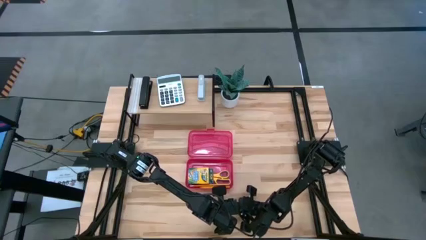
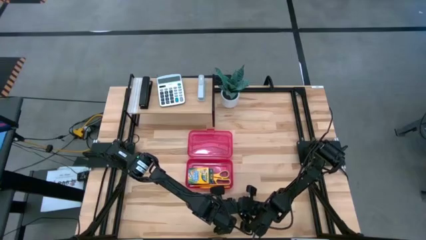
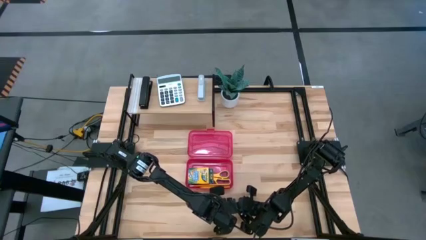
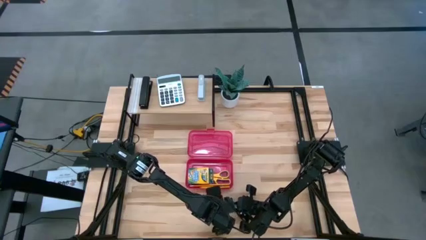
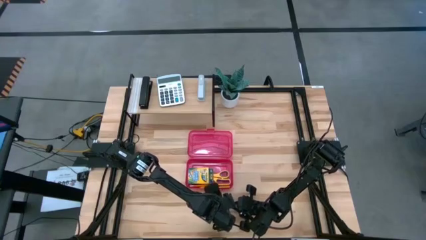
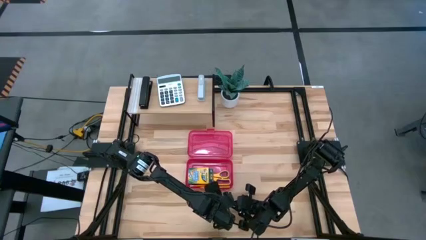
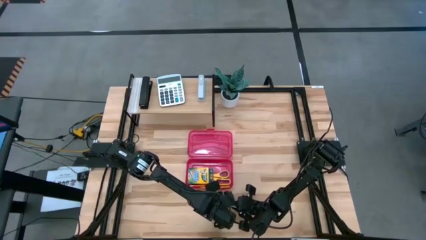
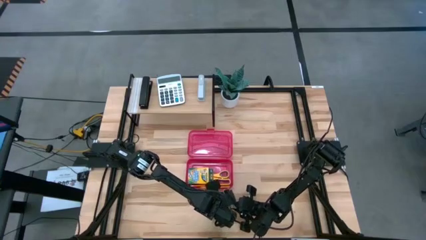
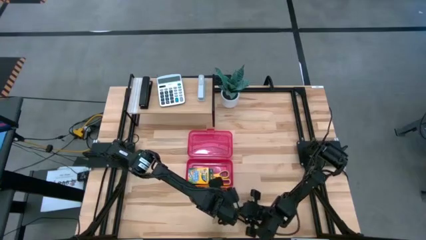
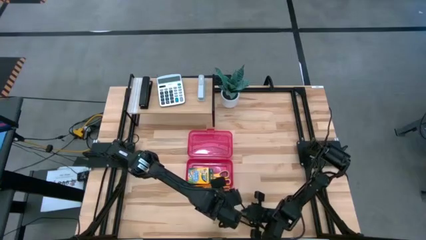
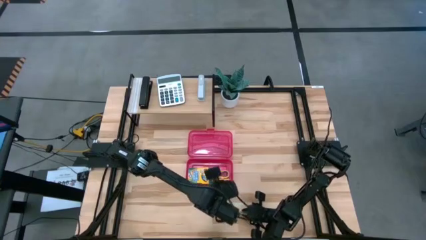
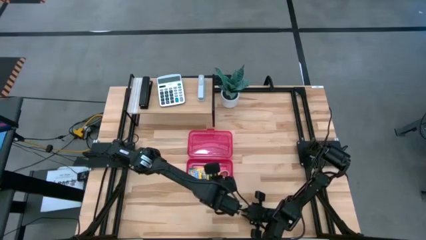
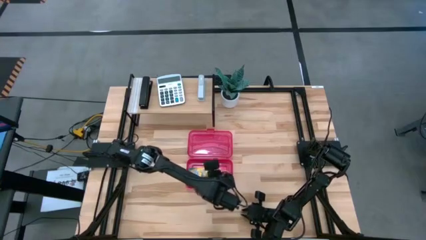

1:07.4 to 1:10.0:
Task: Pack school essentials
Put the purple eraser into the school red supply box

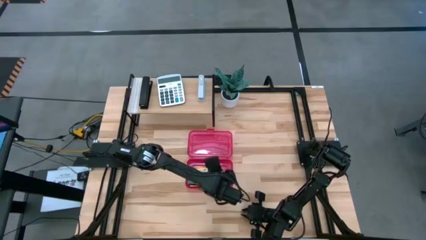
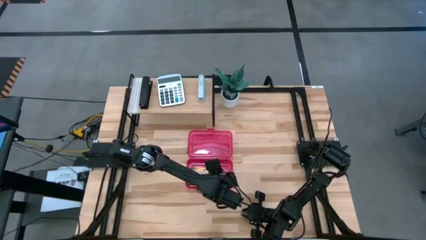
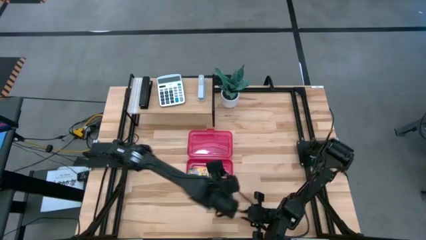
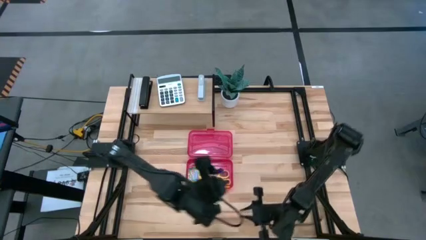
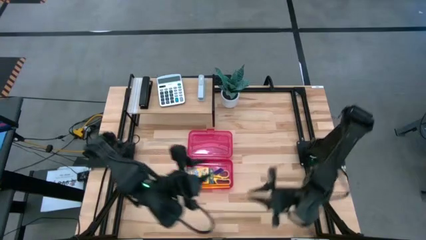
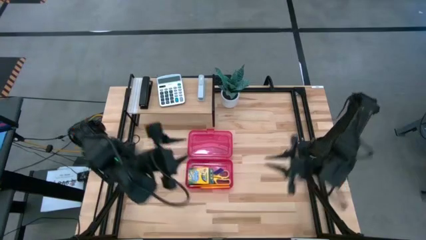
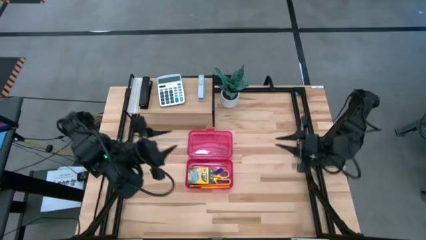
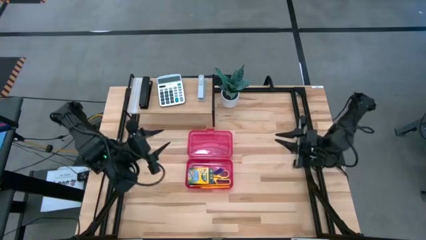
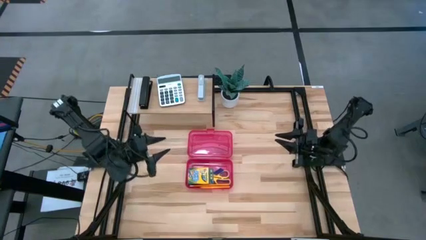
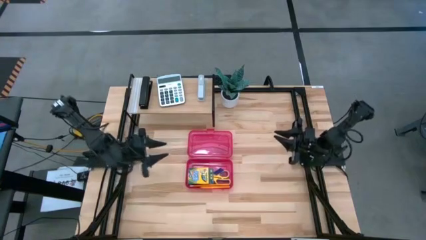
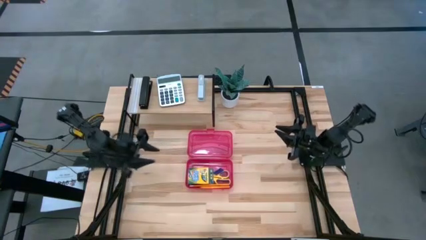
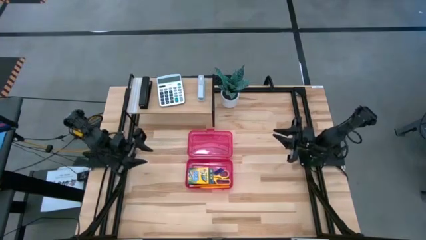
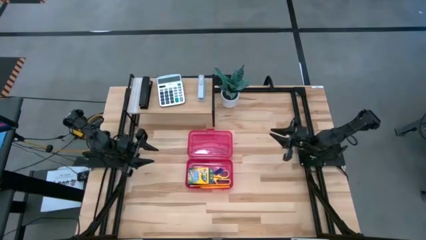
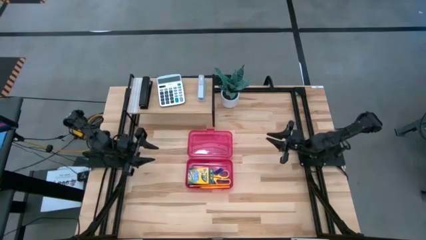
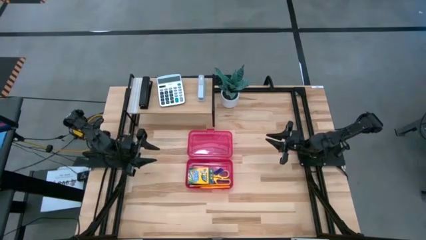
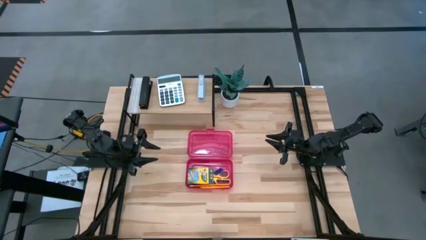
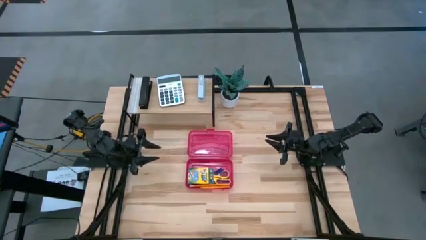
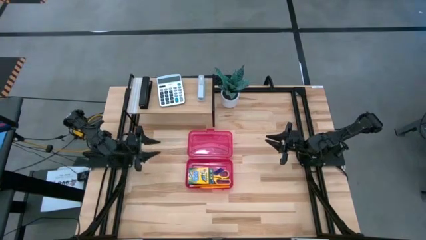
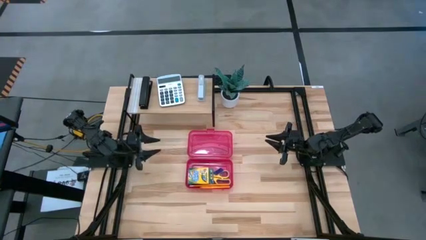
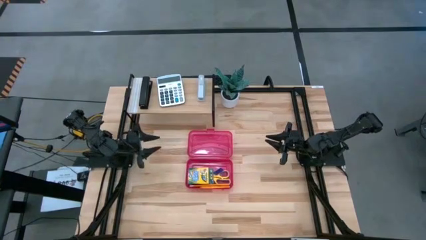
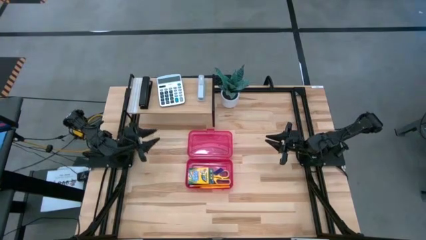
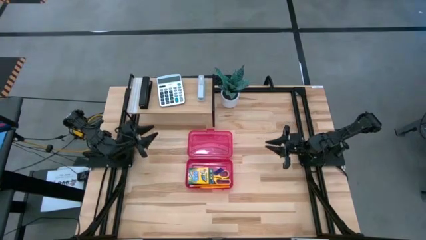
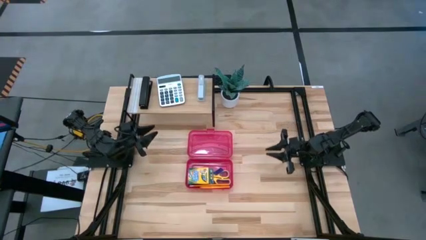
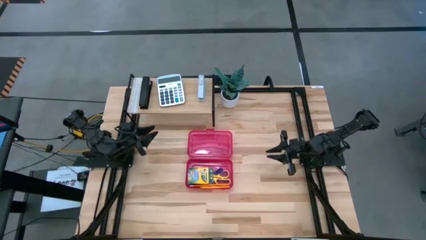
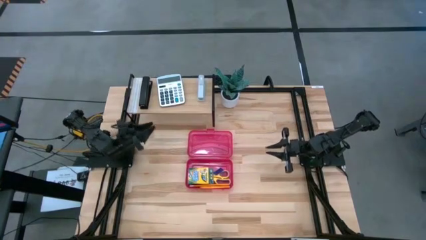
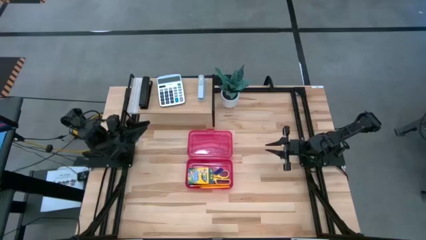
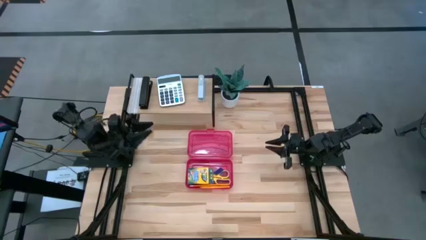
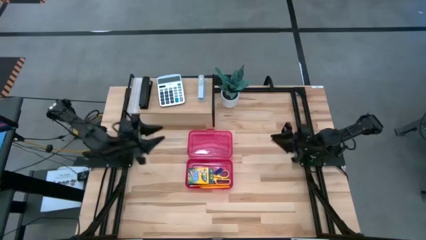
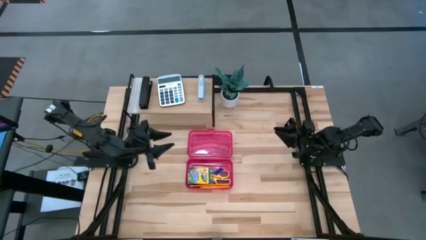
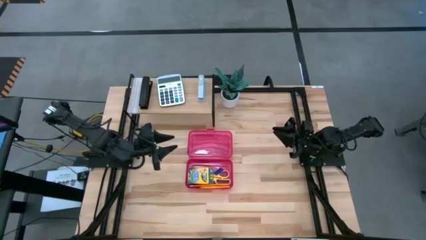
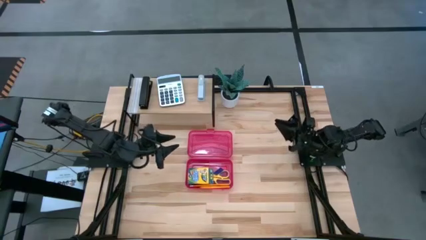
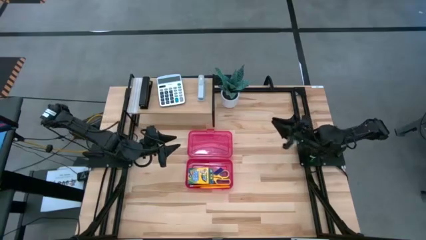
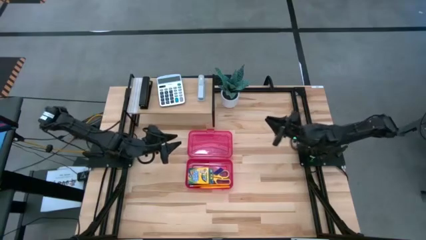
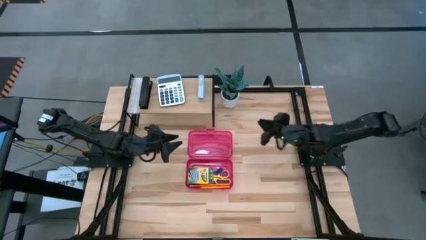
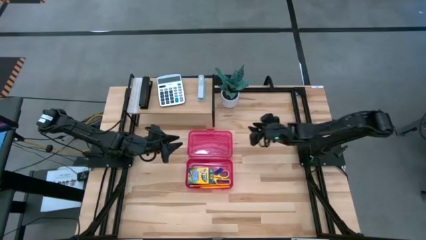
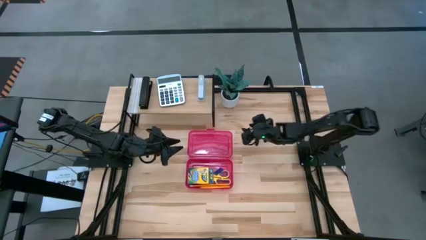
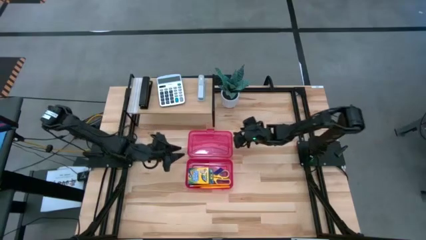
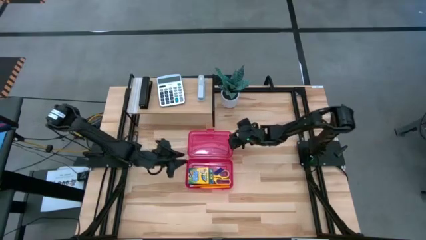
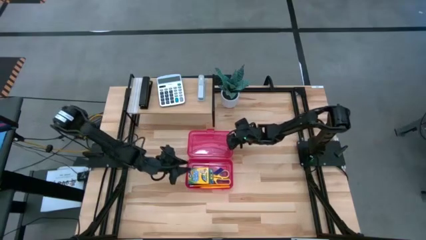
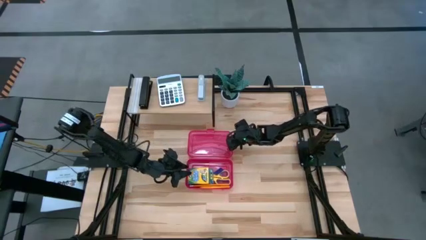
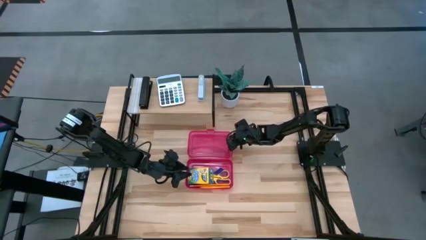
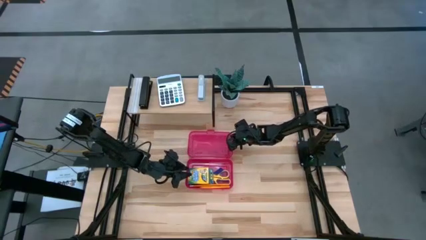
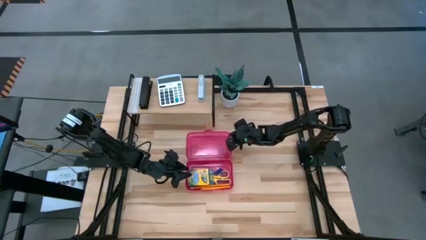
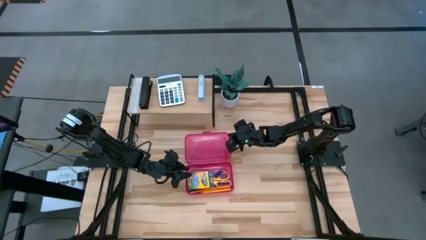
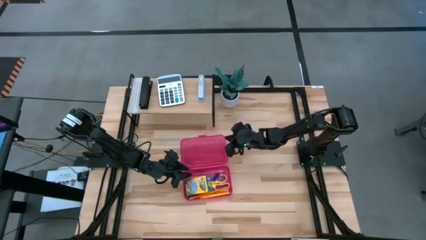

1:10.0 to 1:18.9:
Close the red supply box
